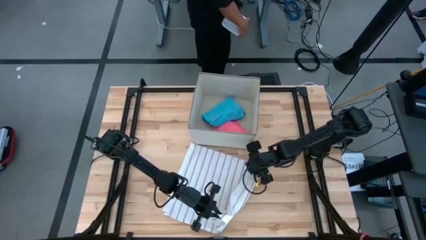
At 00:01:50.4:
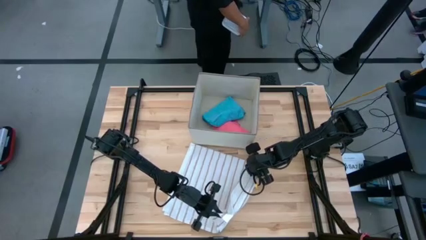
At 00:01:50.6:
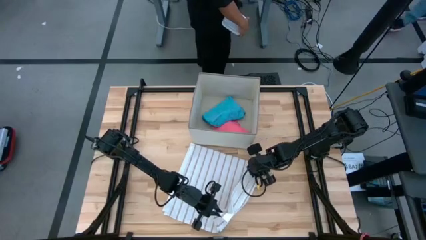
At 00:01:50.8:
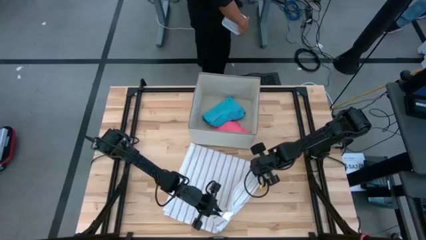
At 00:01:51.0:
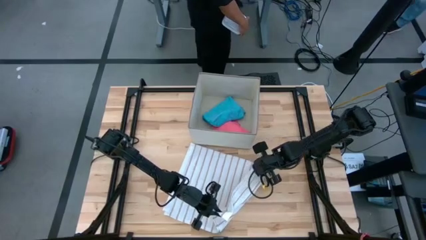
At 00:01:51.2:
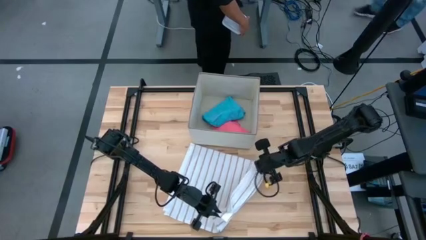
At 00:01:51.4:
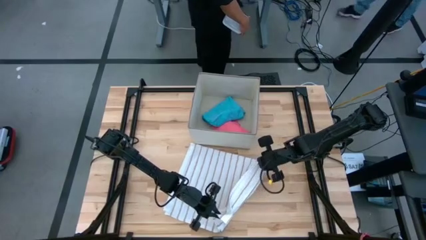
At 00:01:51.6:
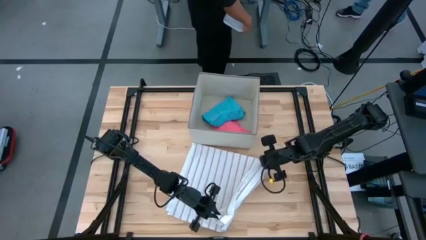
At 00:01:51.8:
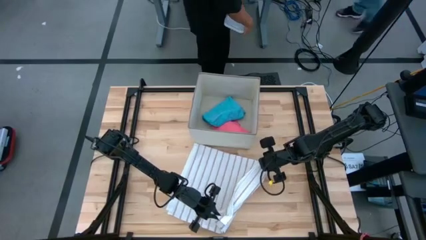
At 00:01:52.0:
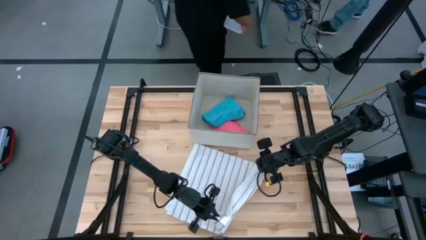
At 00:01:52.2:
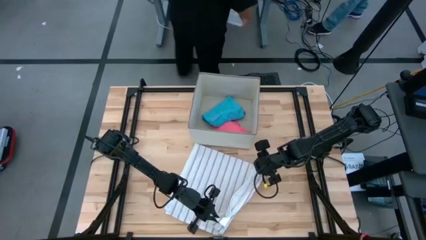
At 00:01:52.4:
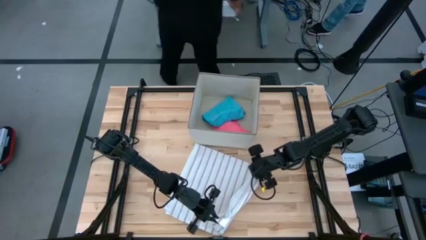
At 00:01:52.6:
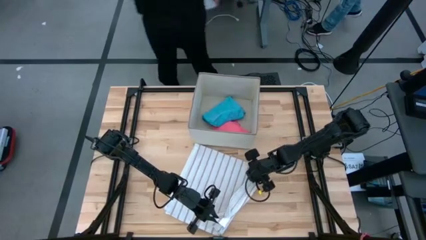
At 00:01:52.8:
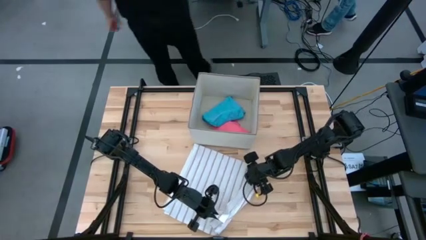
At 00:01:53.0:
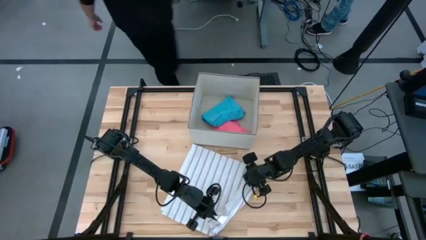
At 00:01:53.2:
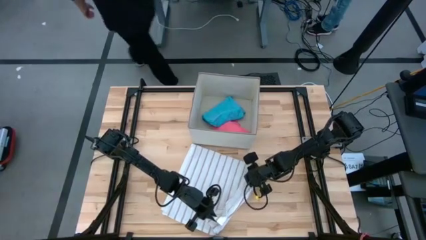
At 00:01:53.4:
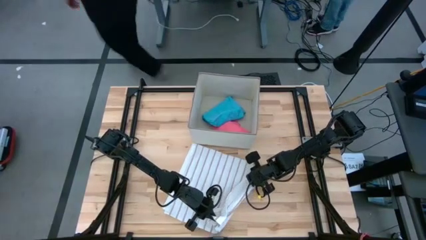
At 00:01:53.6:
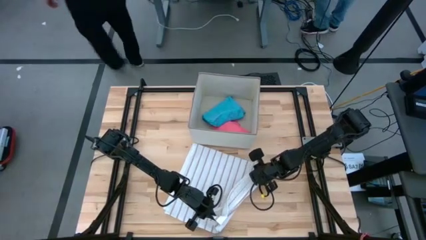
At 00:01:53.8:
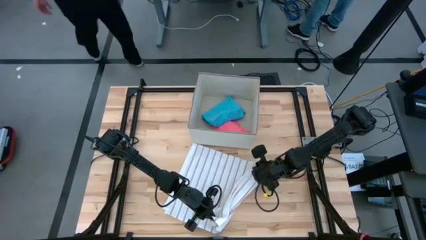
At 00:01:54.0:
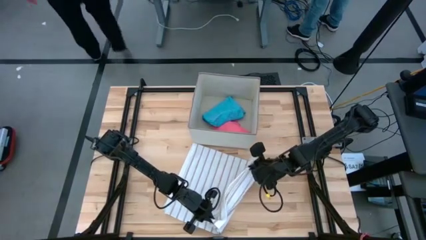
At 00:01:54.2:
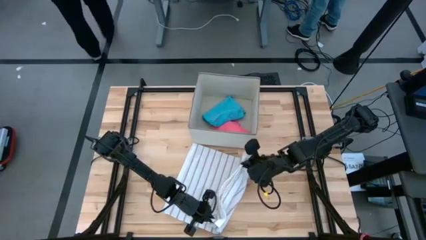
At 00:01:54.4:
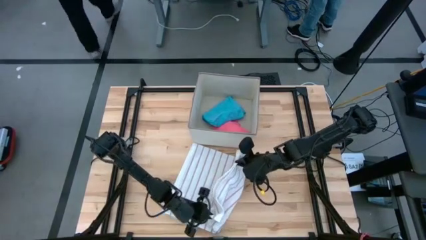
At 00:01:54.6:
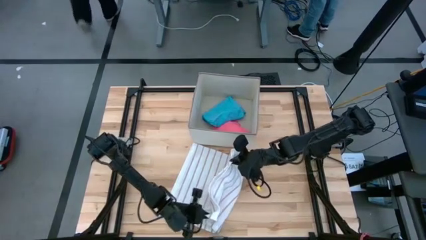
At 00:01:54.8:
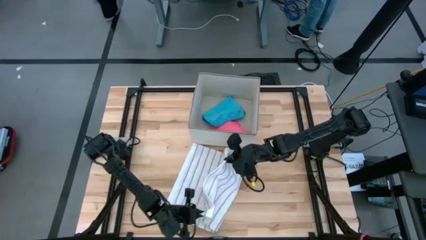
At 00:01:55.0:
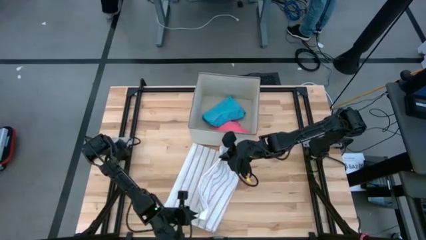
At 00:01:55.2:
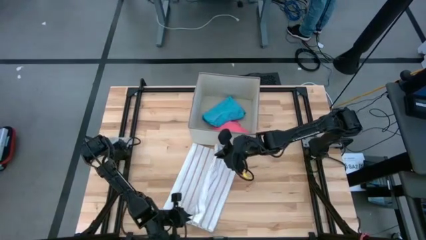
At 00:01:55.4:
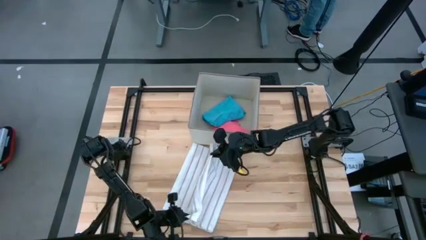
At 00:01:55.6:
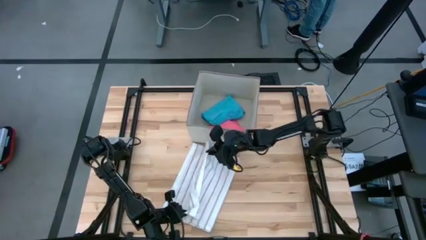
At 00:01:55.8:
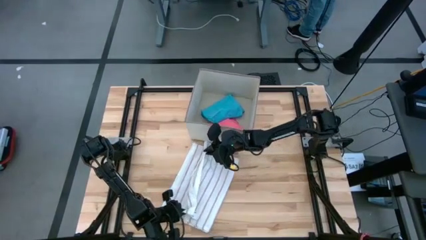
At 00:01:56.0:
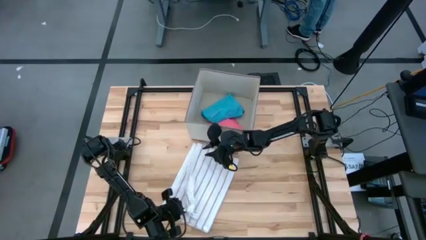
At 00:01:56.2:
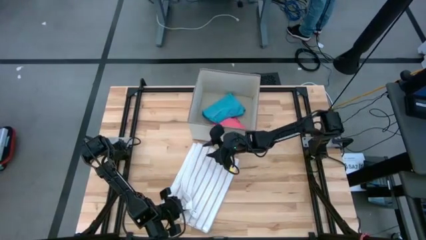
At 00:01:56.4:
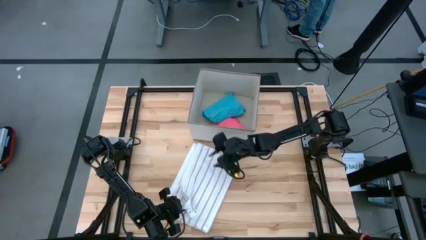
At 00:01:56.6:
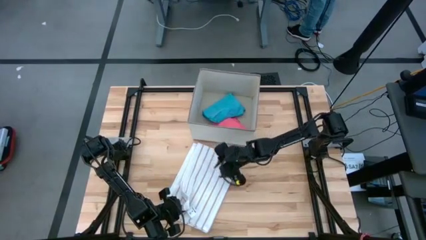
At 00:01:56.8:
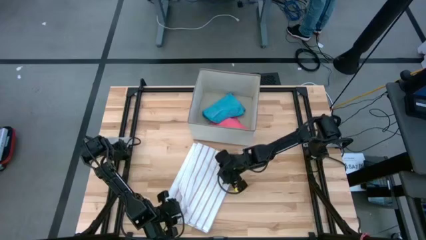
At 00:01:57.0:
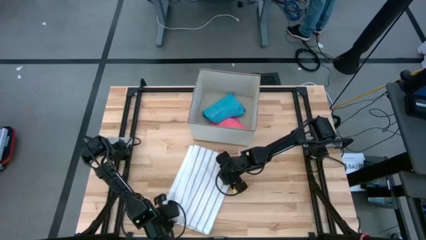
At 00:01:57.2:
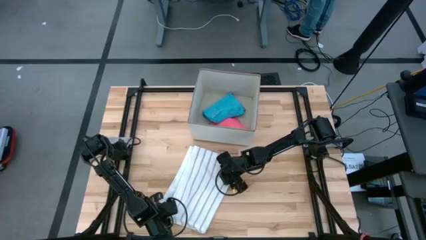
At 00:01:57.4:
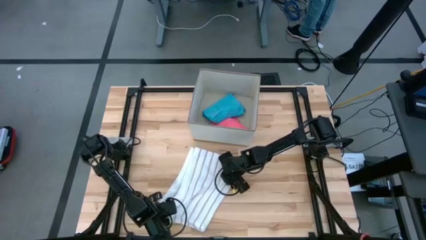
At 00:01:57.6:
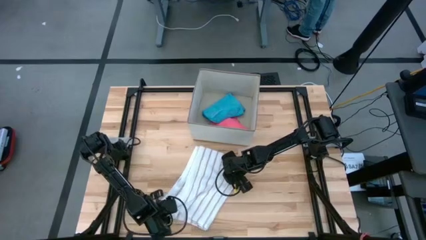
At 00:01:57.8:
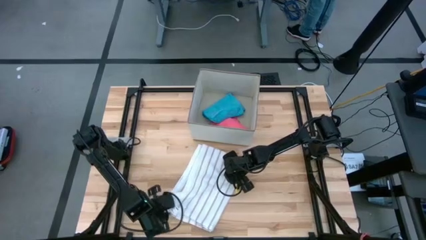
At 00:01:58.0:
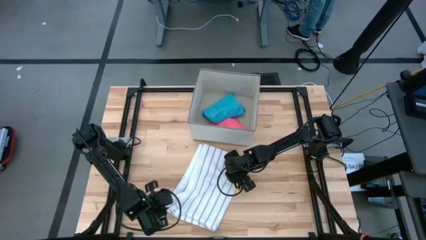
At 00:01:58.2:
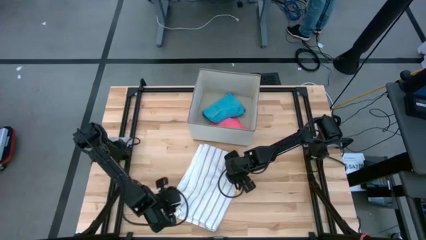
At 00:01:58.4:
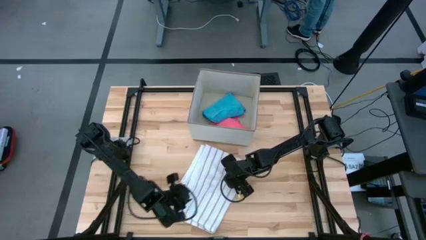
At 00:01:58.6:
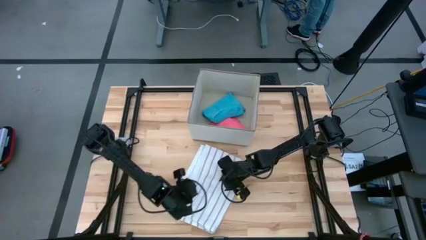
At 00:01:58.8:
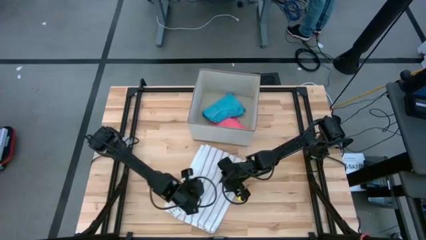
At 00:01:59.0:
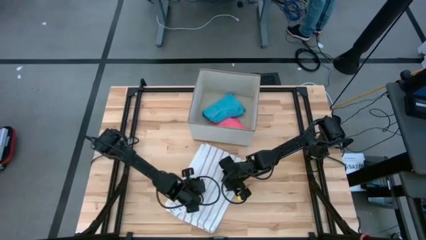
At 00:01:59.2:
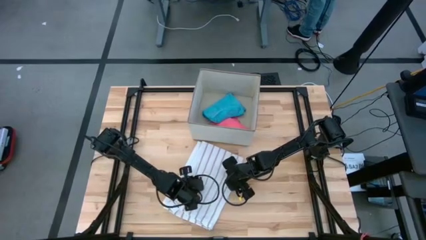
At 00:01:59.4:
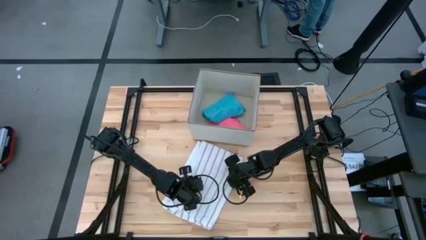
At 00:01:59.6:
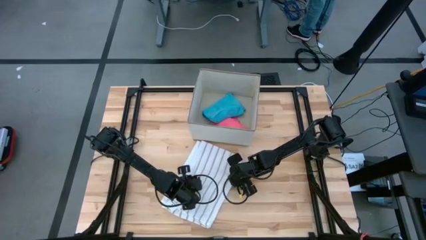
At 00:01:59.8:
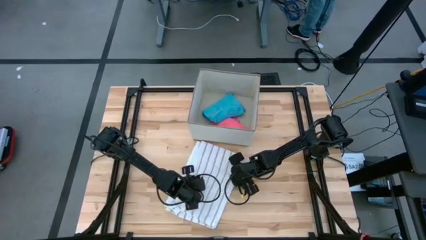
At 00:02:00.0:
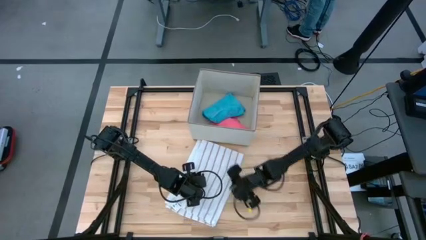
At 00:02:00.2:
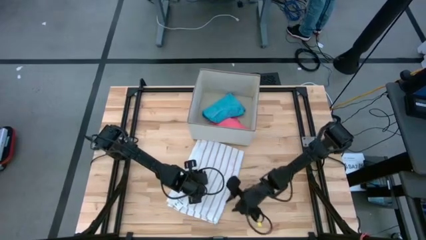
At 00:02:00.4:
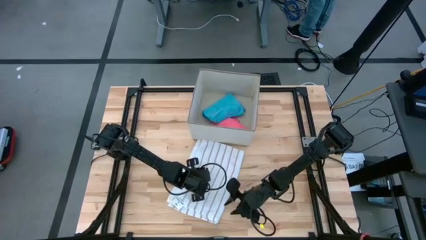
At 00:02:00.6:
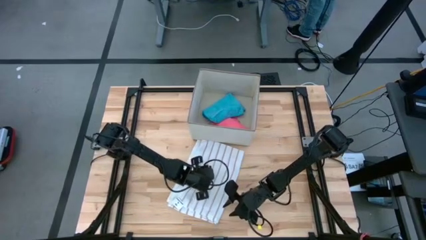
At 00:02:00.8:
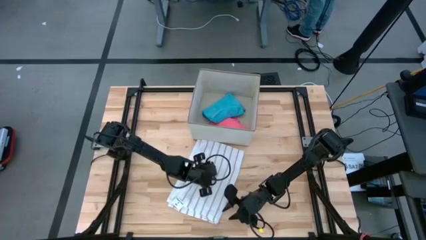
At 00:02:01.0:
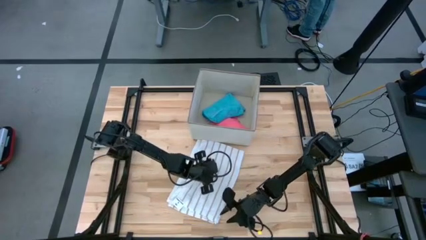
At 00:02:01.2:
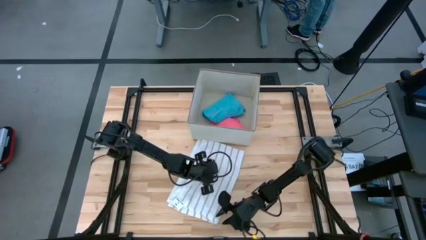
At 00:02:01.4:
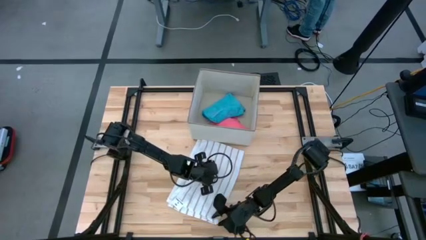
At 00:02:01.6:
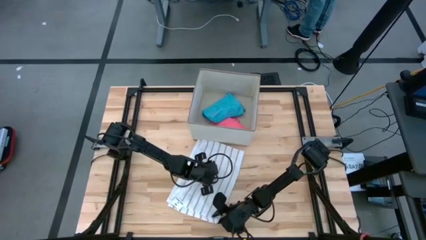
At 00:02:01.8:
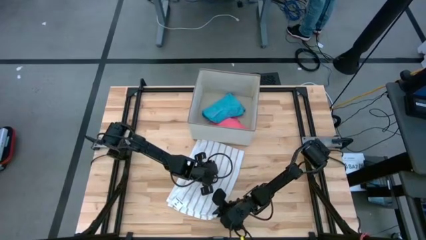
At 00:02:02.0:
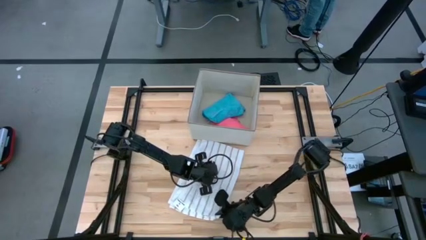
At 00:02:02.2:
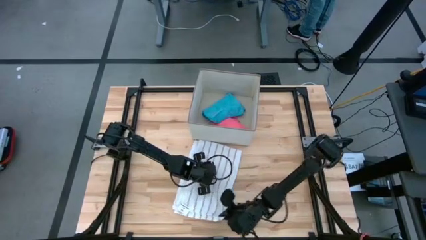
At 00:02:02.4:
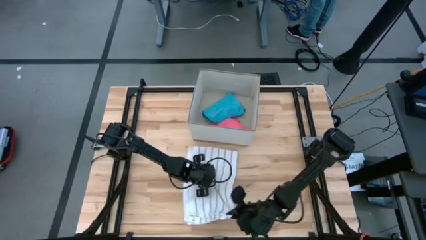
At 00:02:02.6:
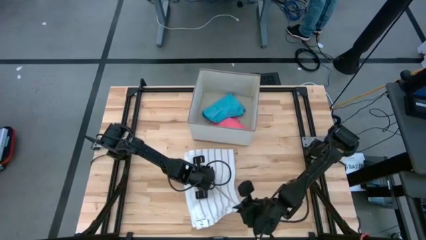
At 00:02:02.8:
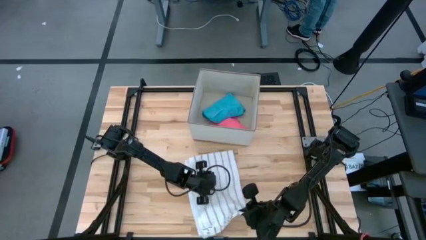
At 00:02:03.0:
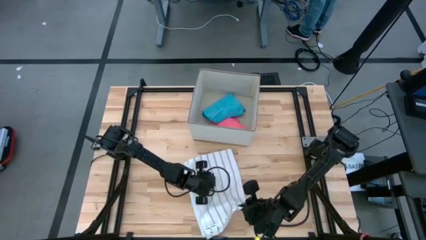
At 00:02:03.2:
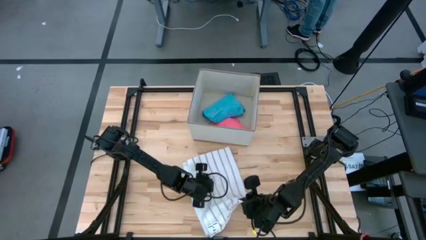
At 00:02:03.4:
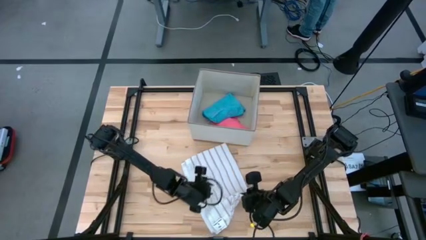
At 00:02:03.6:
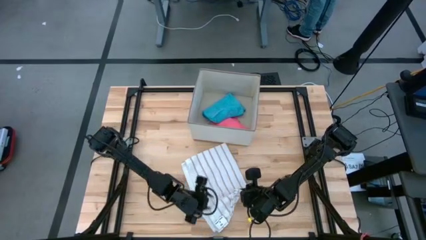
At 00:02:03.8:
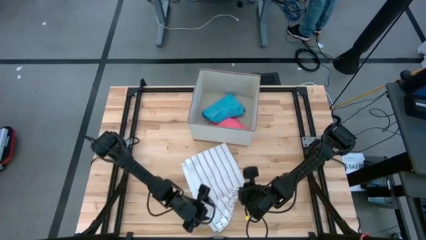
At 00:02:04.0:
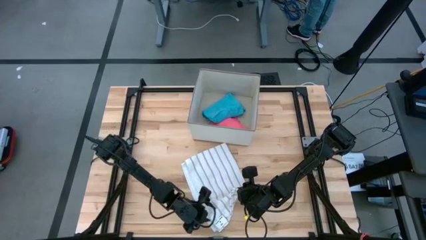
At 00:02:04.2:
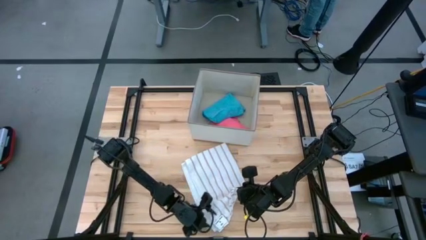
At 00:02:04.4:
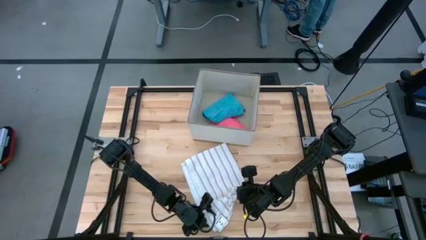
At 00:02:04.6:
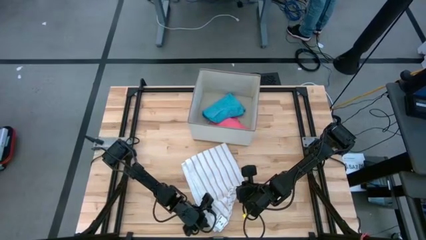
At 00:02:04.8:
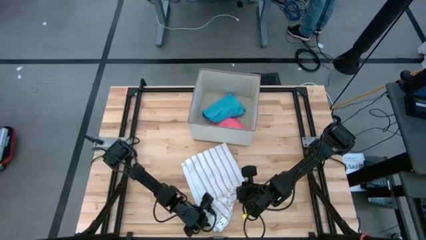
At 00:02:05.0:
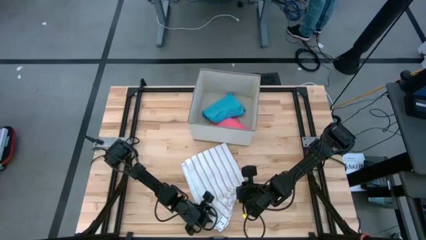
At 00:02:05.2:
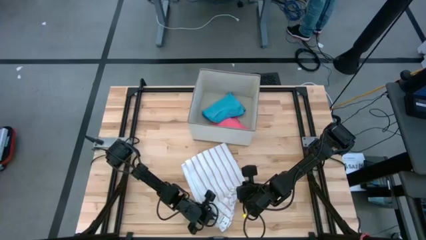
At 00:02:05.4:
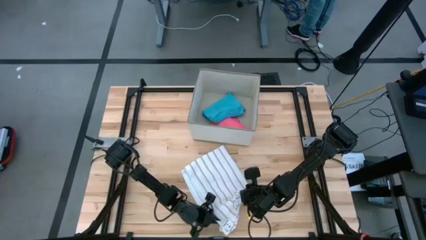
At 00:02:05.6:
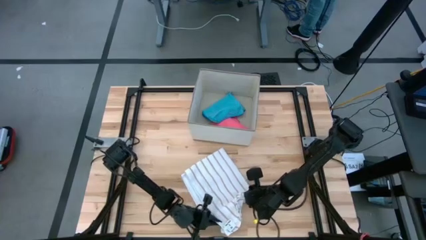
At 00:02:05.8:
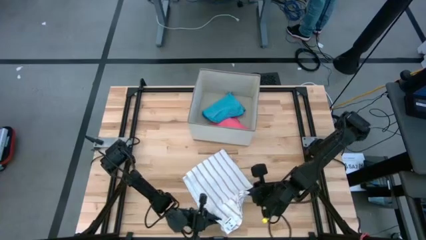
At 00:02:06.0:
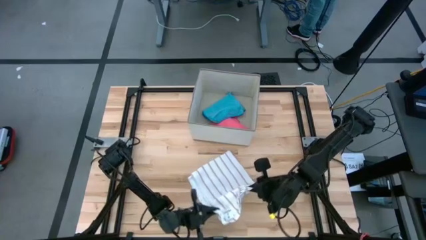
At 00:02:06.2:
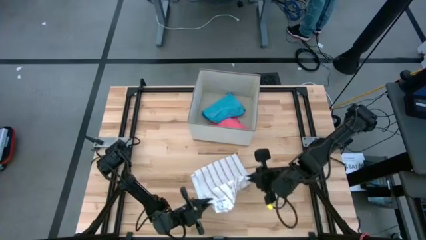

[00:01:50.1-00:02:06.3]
Task: Fold towel
Fold the white towel
